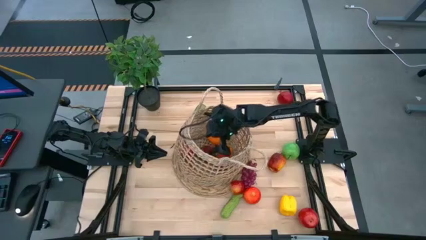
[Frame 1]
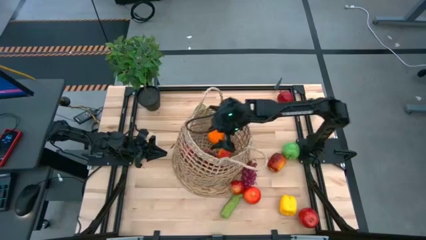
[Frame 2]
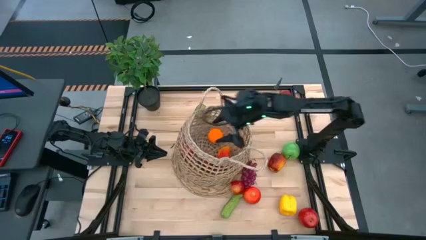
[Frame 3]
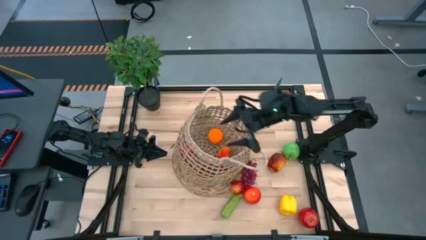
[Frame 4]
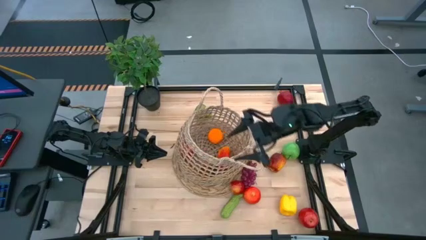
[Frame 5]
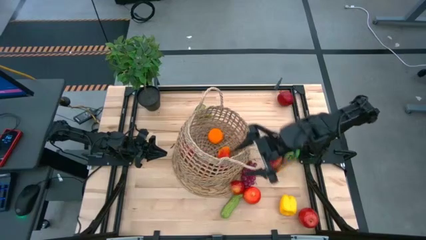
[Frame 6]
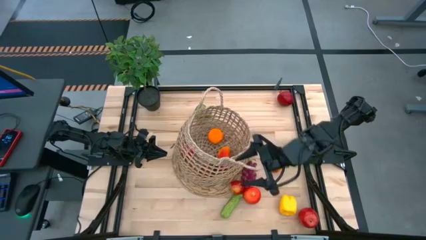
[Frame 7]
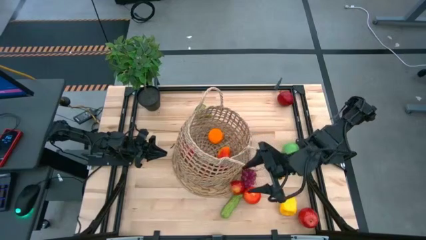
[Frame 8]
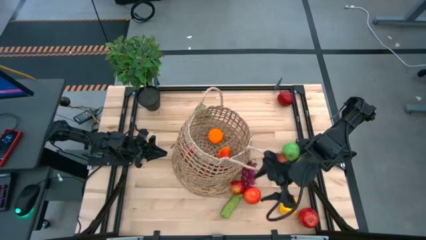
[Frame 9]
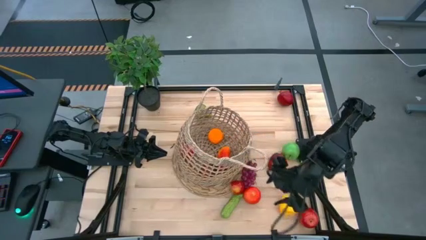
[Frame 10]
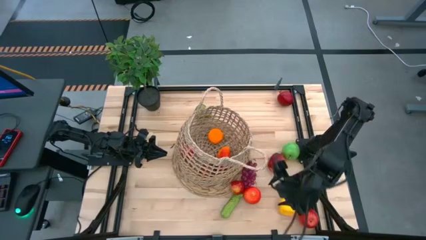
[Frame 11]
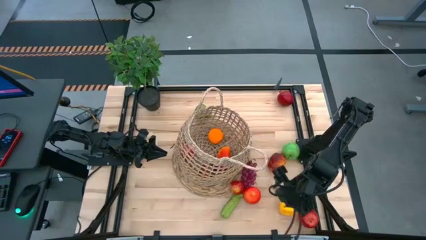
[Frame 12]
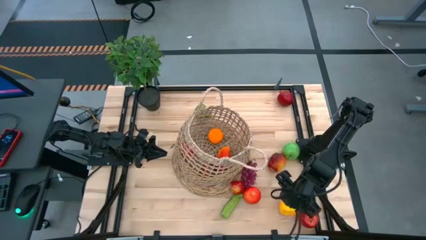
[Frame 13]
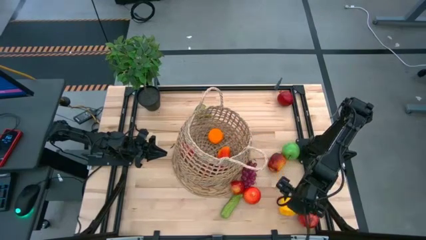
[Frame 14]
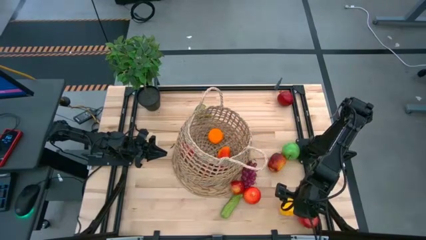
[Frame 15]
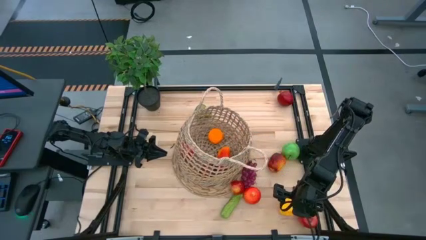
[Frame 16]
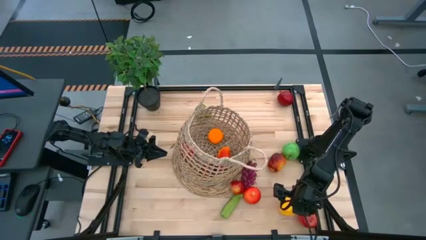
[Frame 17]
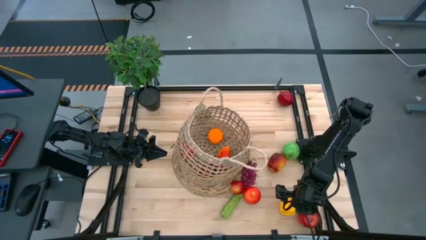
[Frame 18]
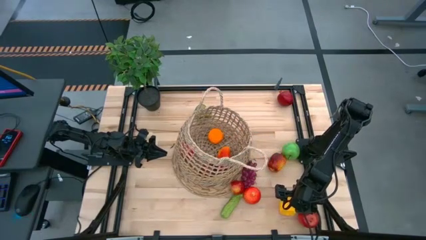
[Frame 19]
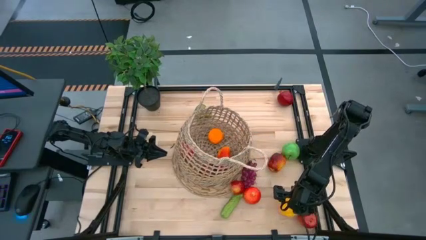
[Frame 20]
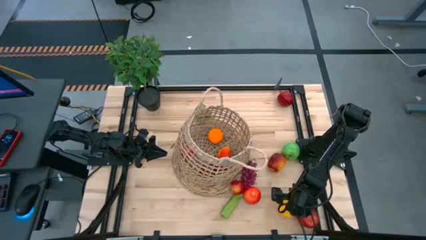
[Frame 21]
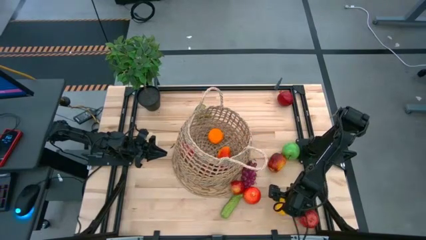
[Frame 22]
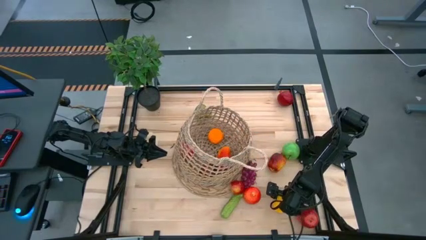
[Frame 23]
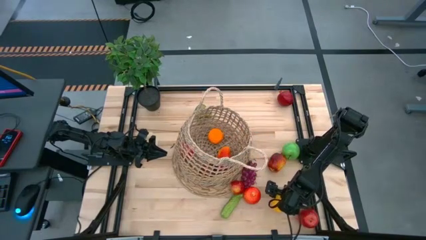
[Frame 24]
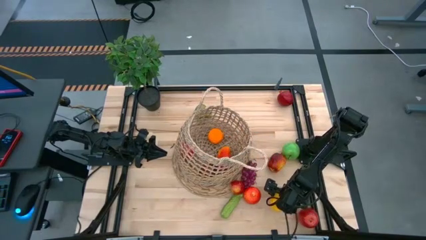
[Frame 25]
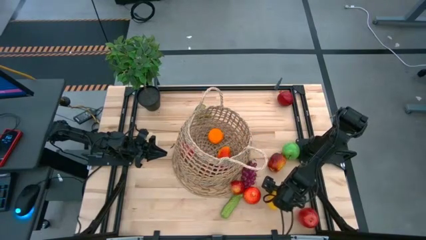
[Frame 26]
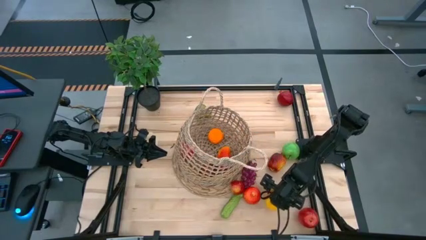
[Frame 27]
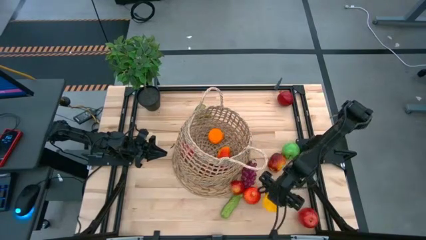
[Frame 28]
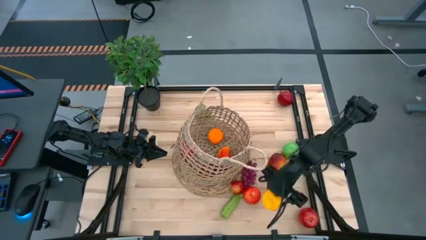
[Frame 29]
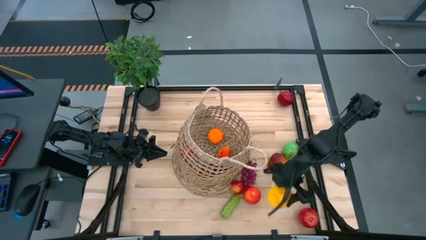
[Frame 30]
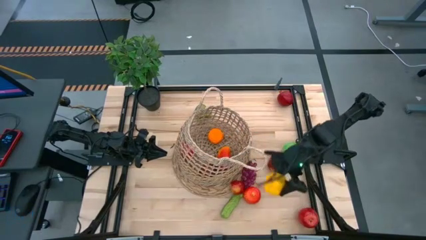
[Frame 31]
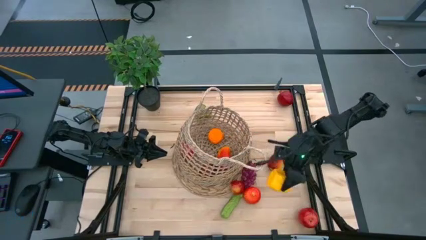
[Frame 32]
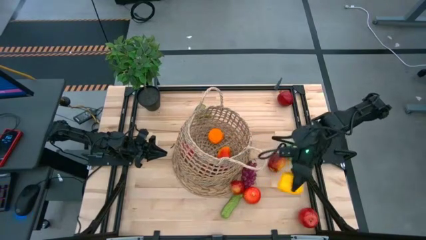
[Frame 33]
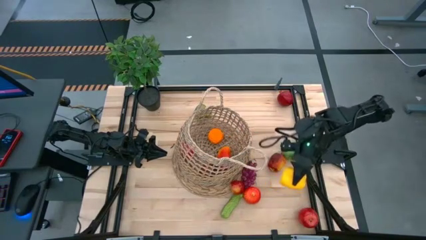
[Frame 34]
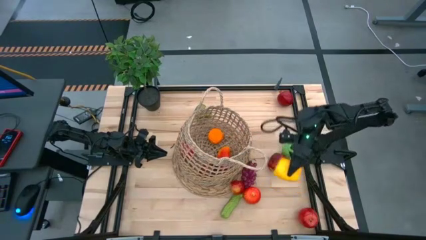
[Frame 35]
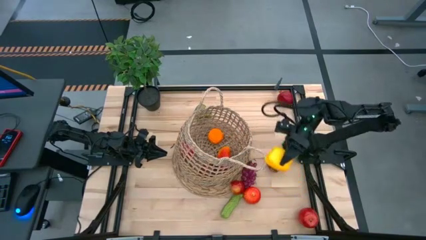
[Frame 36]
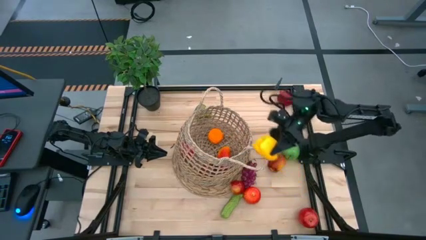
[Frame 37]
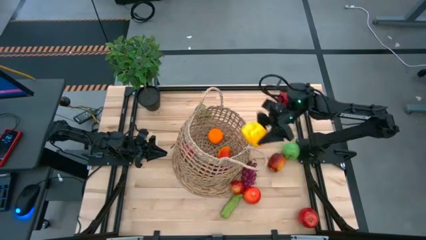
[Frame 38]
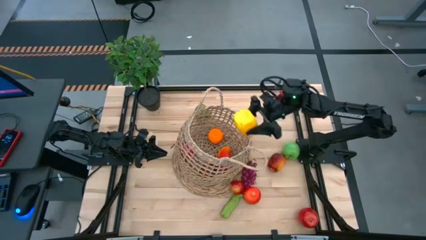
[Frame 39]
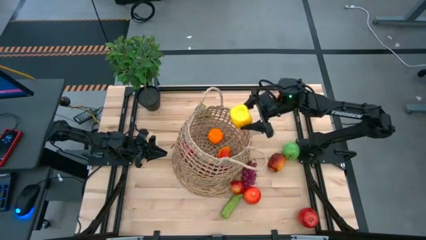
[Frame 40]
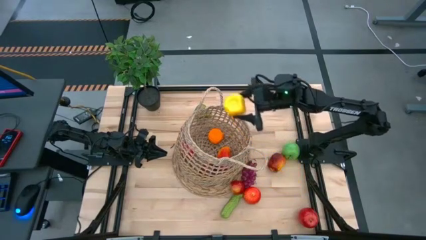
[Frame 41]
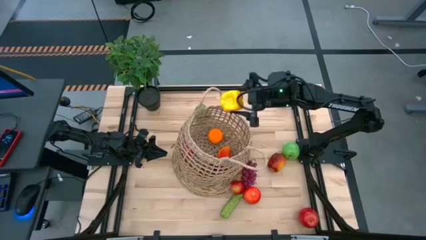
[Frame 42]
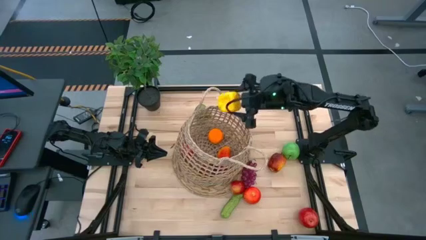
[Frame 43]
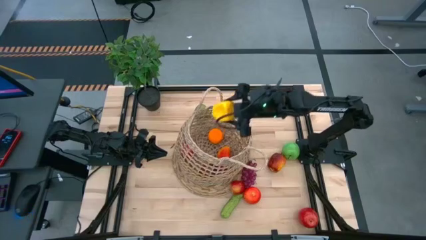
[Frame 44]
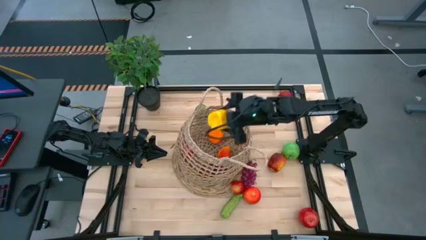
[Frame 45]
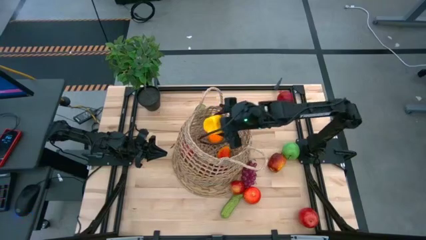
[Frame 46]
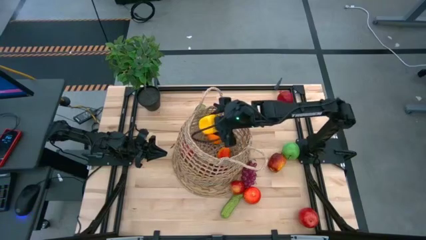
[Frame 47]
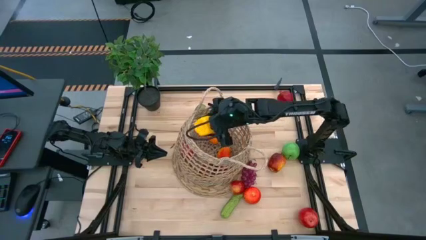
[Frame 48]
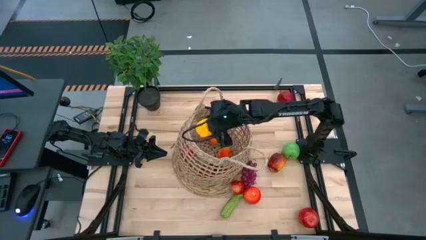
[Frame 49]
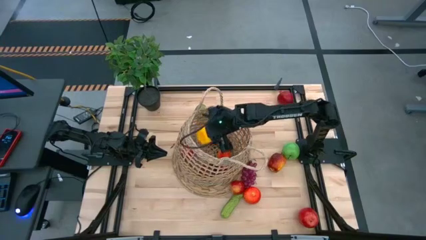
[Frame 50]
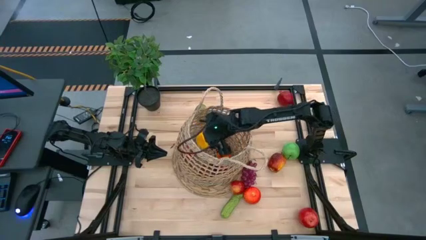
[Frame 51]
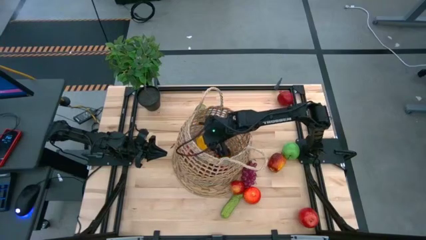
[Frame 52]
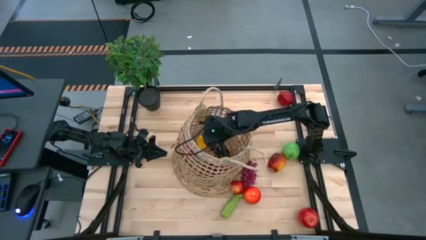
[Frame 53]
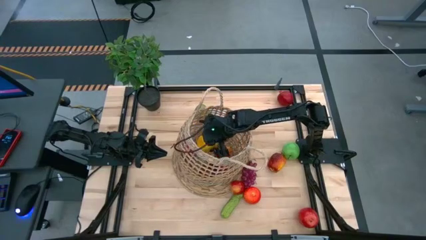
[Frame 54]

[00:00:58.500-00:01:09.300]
Task: Build produce basket
Put the yellow bell pepper into the brown basket

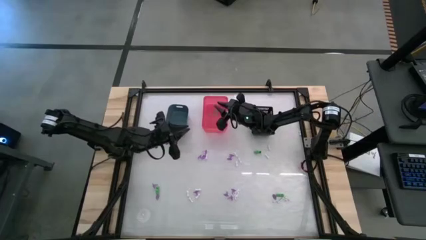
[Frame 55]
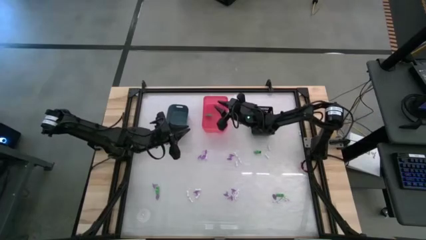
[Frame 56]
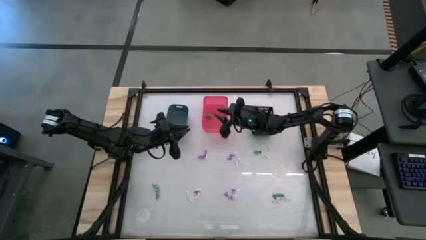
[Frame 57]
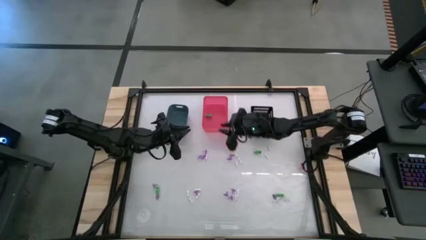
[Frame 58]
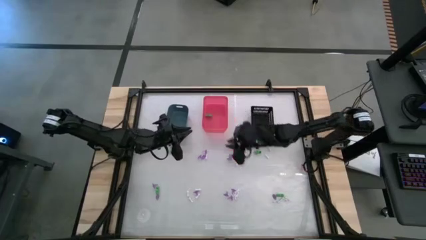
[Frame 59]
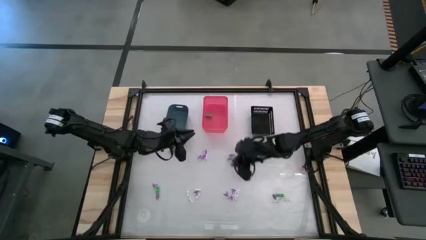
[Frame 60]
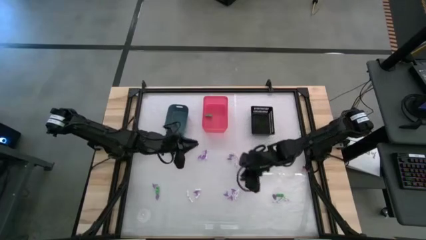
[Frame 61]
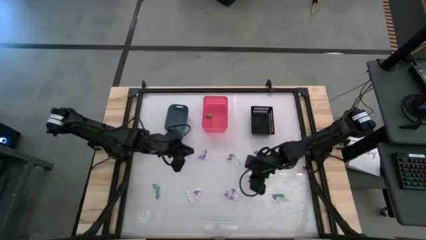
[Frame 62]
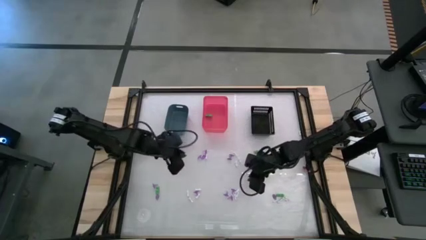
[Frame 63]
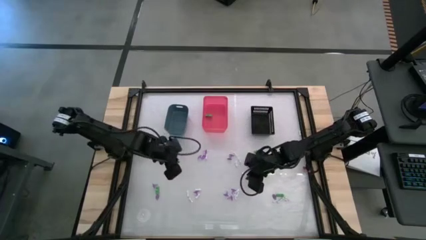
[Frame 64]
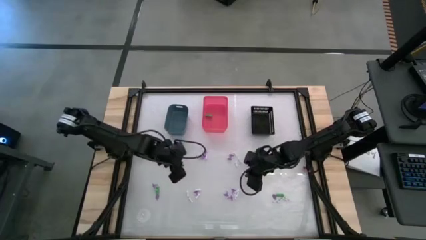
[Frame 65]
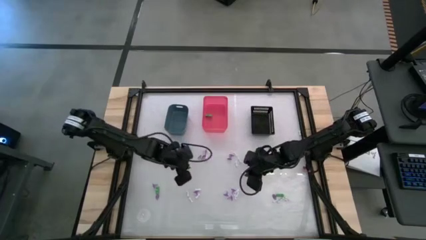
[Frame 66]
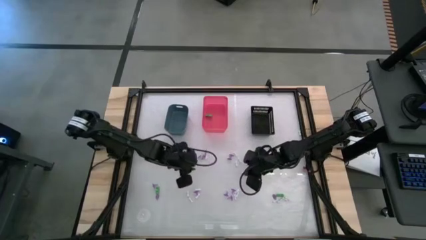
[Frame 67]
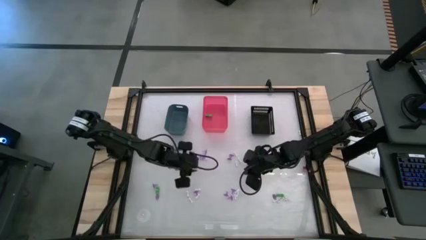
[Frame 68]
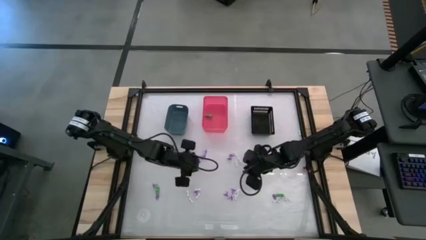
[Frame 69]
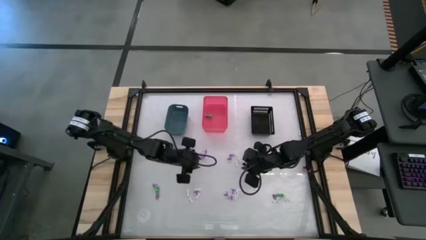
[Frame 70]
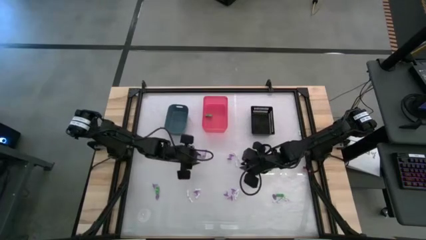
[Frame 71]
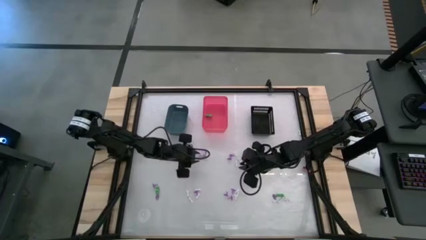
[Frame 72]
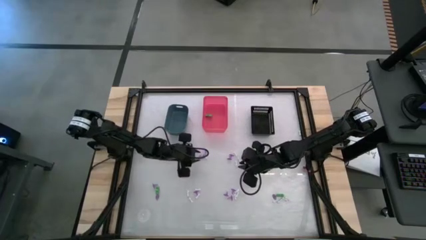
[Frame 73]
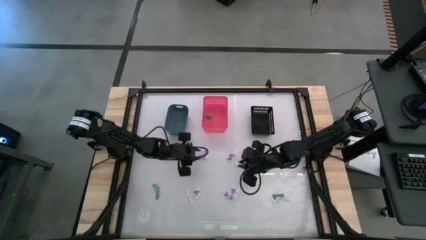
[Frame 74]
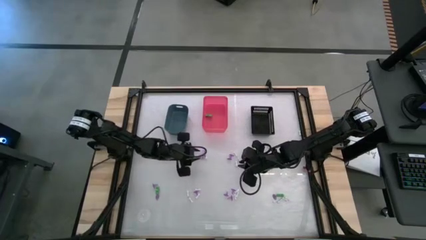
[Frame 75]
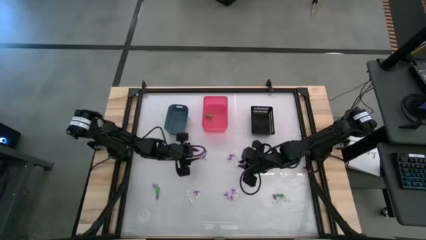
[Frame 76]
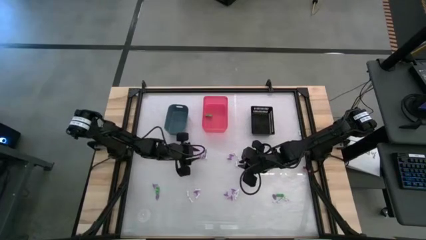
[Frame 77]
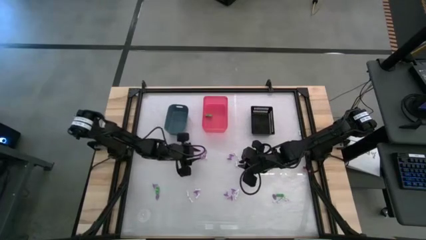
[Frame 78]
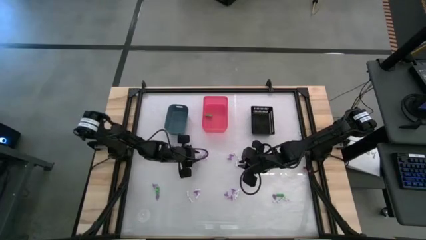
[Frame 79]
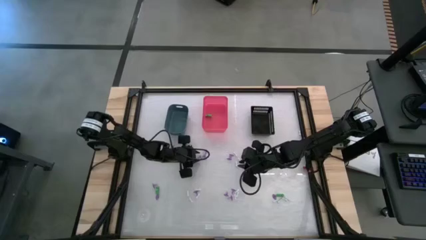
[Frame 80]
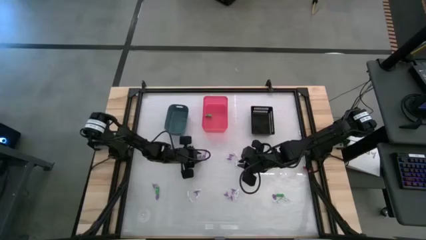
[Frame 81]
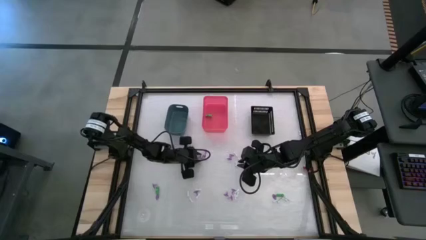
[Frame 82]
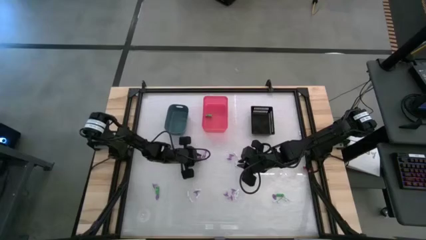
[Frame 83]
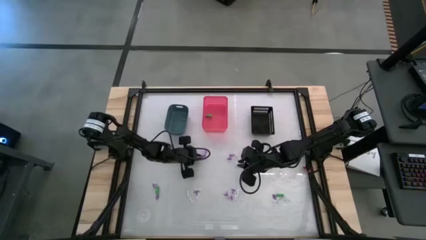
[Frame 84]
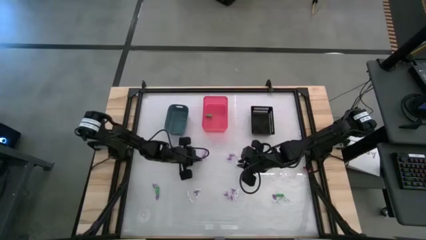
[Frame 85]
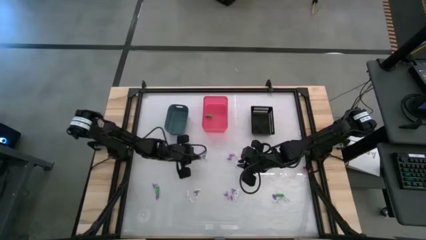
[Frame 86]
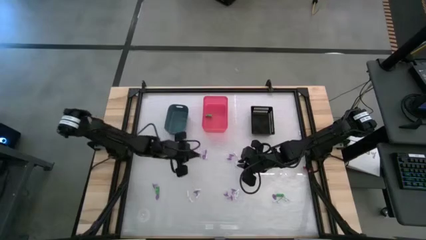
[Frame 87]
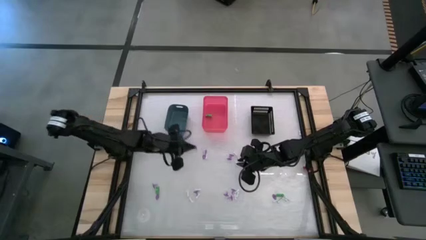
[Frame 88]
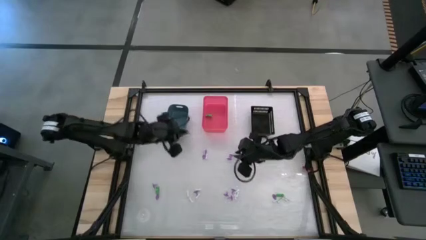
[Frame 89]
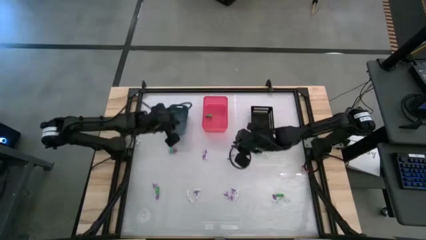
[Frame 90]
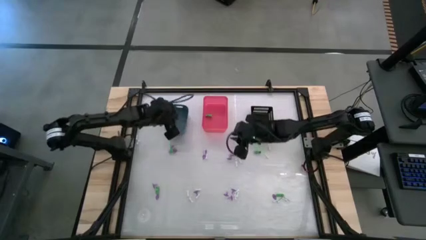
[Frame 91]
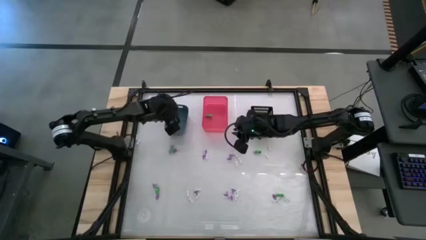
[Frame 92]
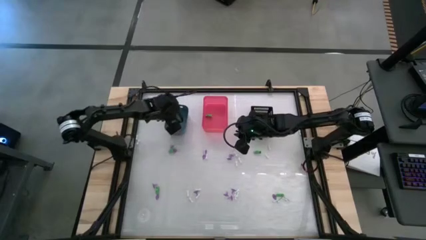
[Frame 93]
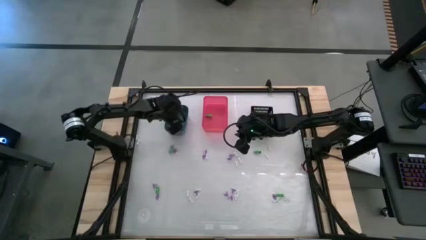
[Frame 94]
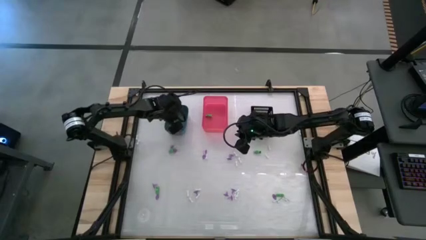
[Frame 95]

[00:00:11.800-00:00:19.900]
Task: Sort Halloween decoration
Put the purple witch hat toy into the blue bin
